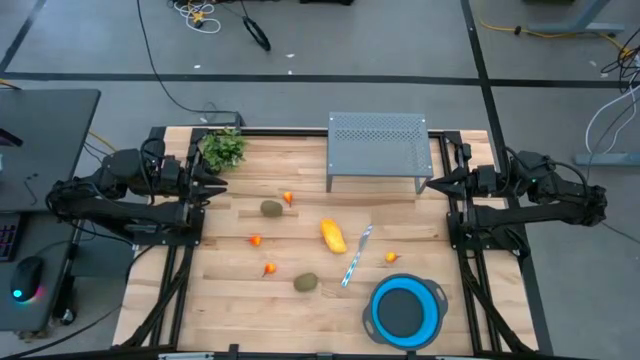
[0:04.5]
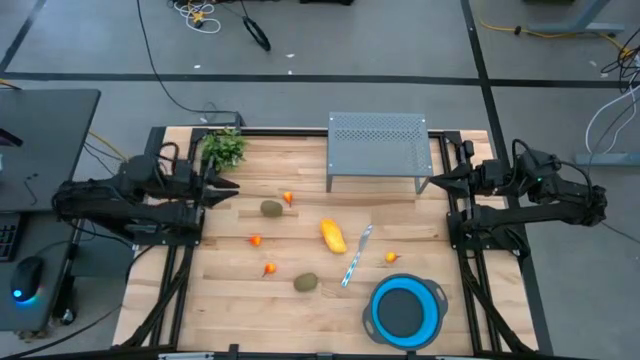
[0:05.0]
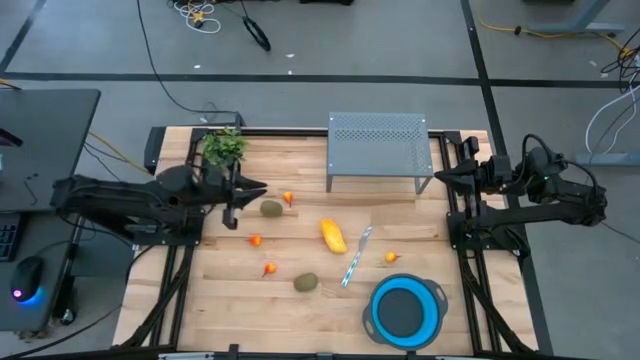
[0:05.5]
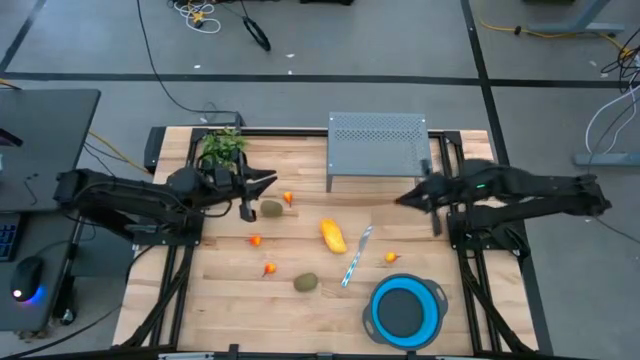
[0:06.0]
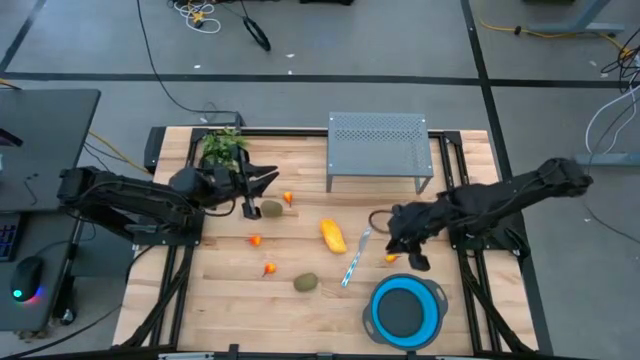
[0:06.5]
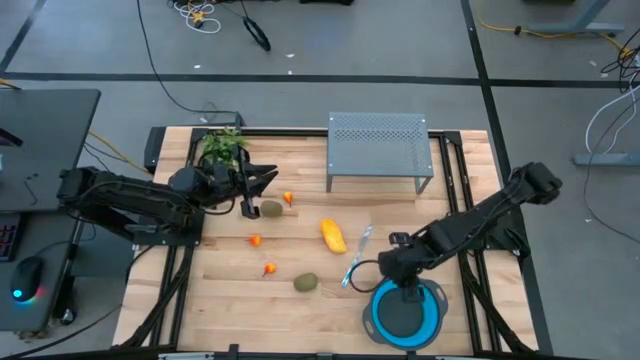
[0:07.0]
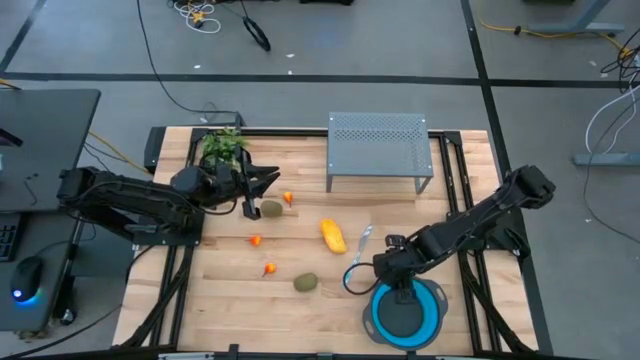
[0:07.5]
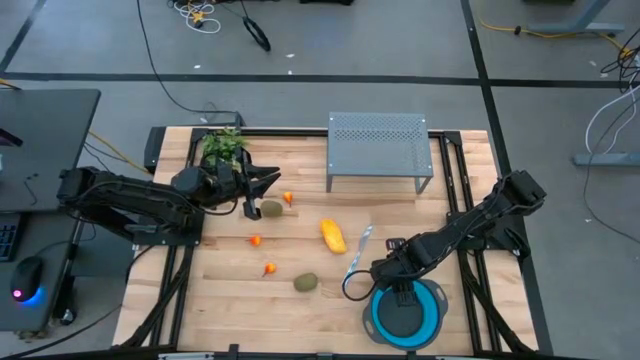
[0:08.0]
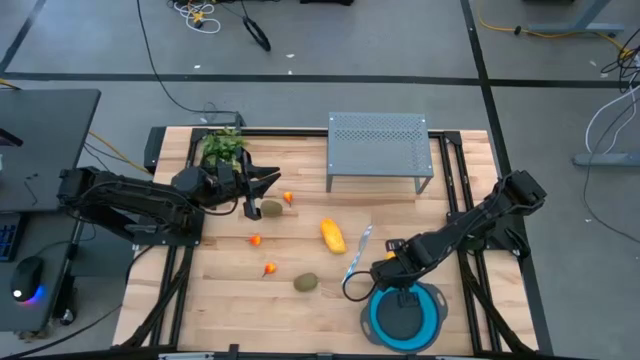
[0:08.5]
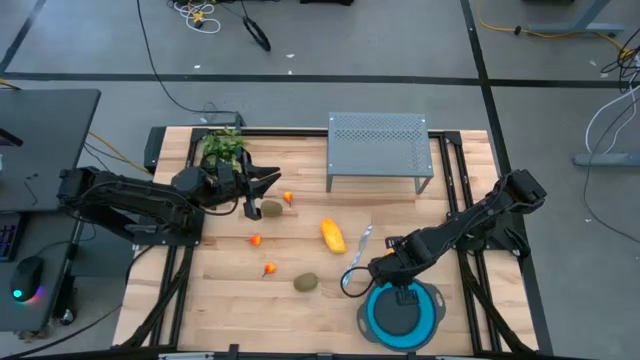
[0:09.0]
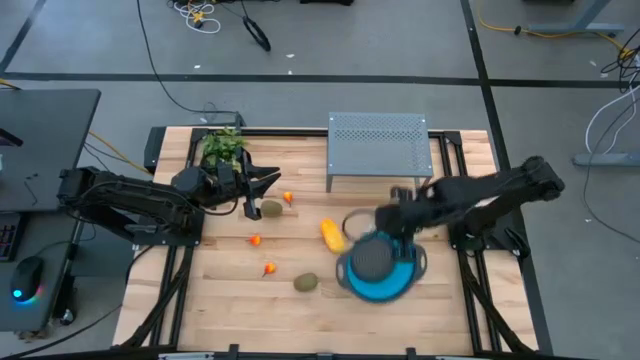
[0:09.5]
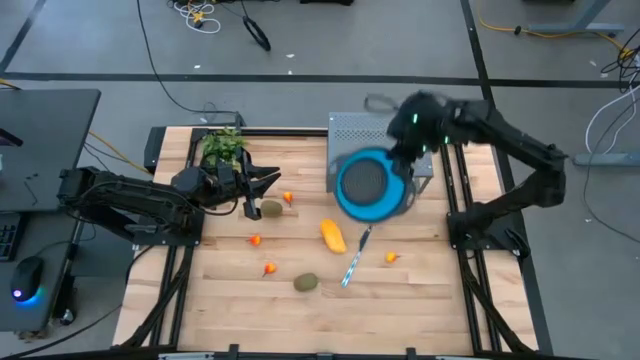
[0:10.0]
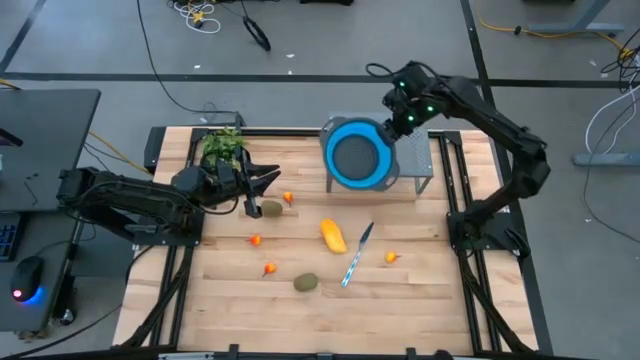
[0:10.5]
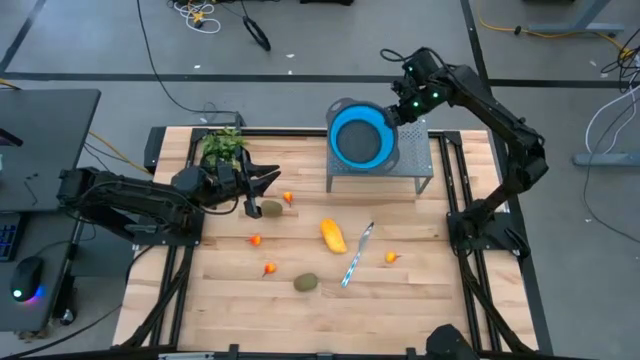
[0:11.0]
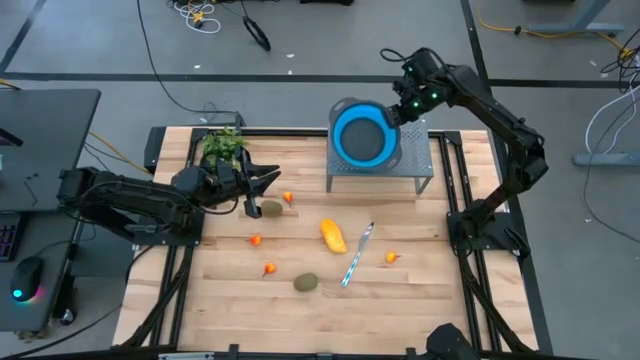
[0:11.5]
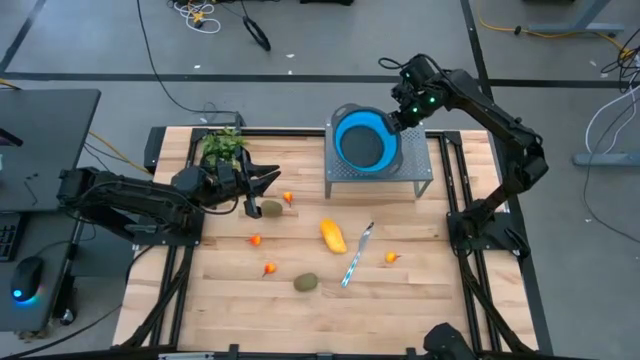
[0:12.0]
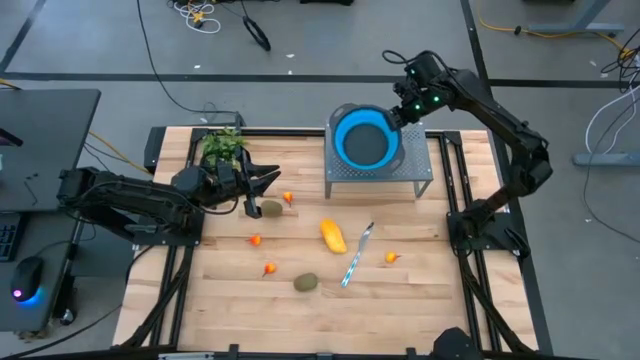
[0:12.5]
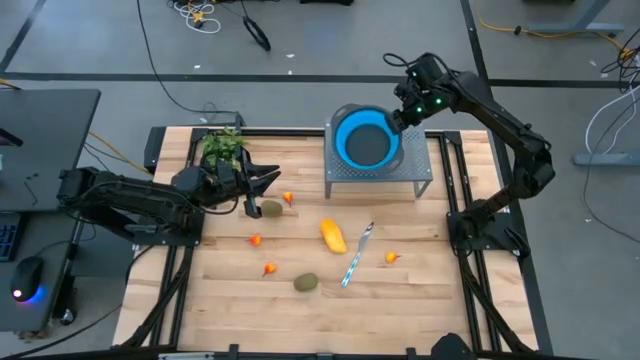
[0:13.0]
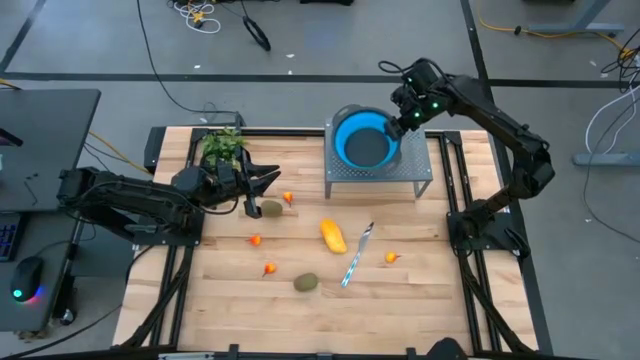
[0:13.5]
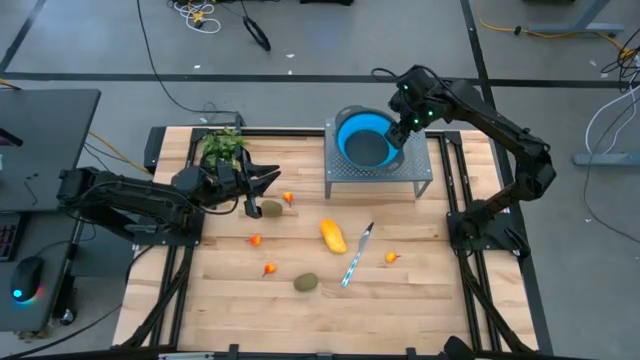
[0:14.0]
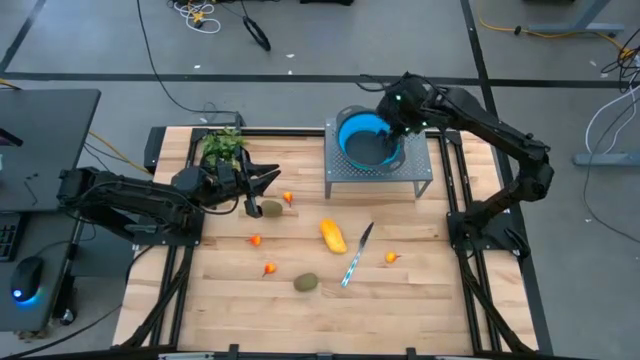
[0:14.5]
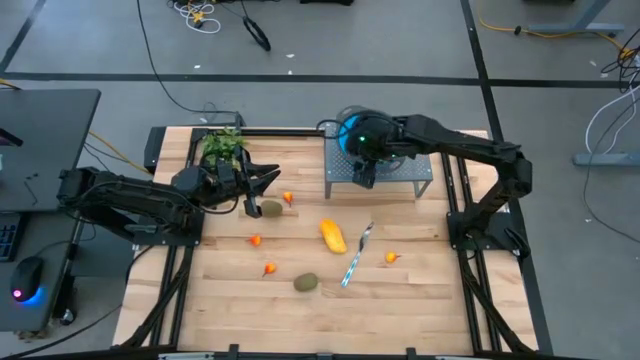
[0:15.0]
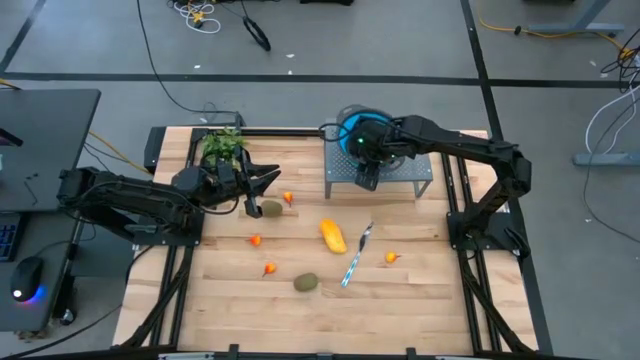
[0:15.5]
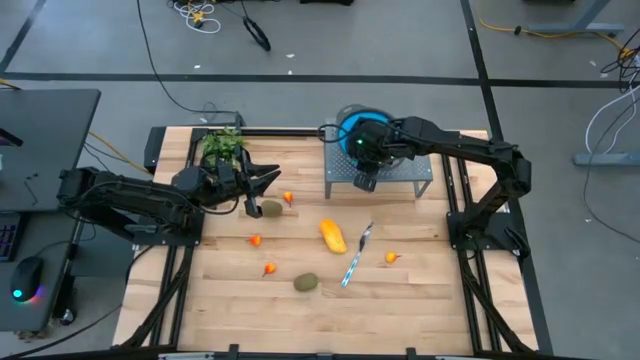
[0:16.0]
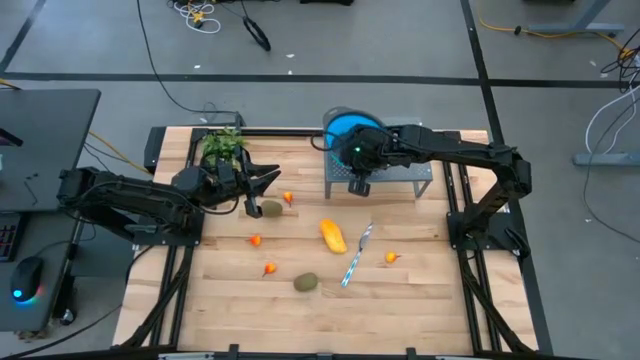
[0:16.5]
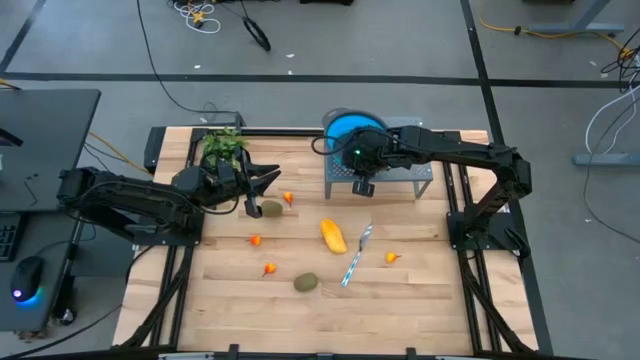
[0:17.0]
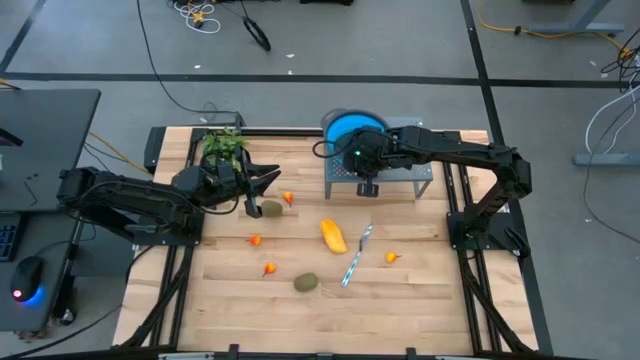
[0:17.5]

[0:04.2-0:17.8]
Task: Pick & Place Fruit
Put the blue strainer bowl on the shelf

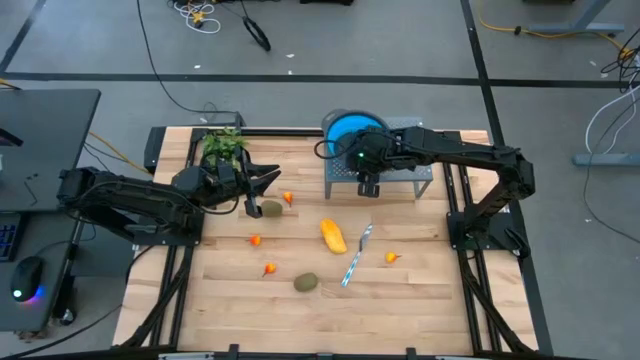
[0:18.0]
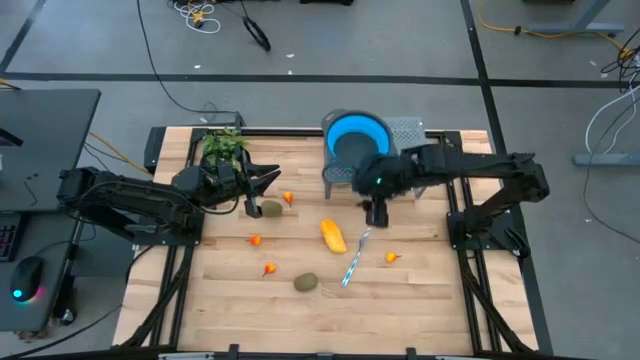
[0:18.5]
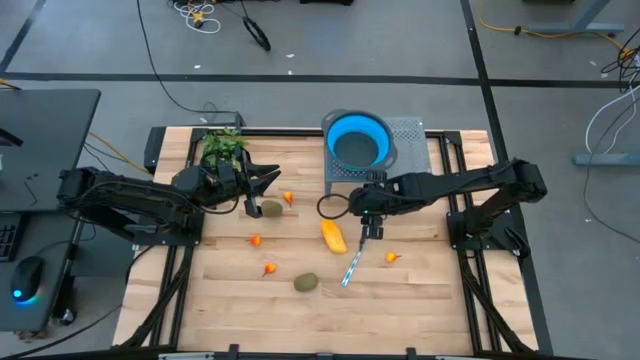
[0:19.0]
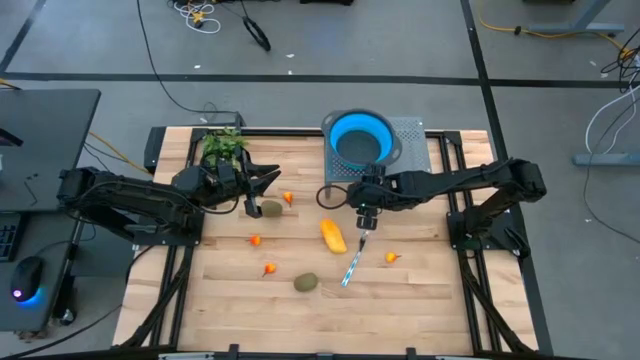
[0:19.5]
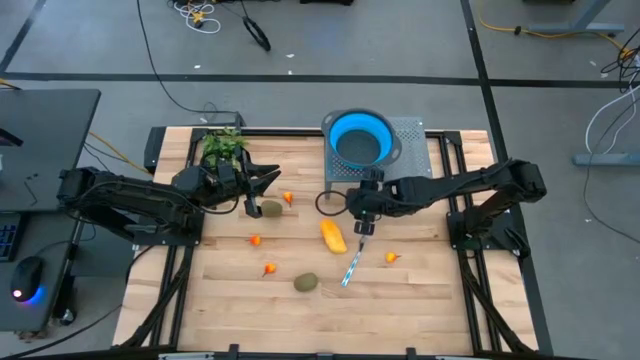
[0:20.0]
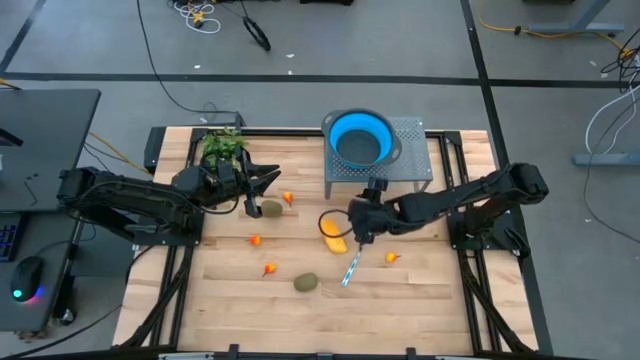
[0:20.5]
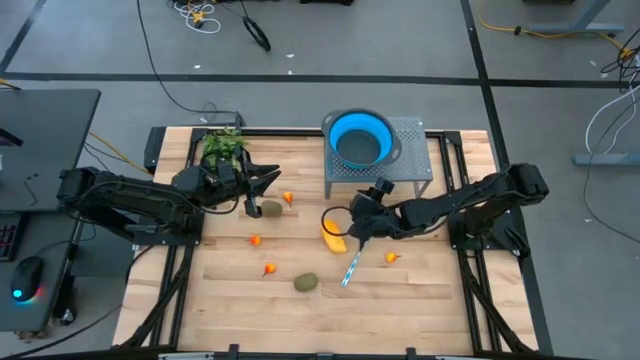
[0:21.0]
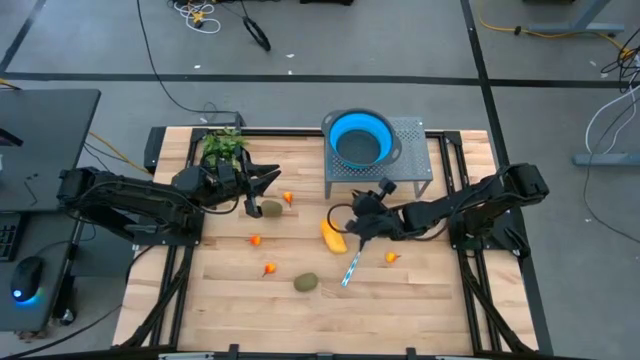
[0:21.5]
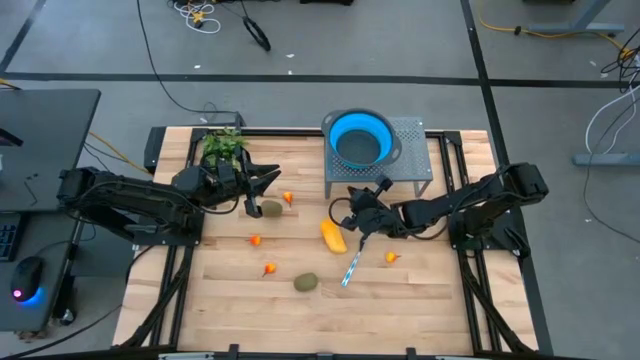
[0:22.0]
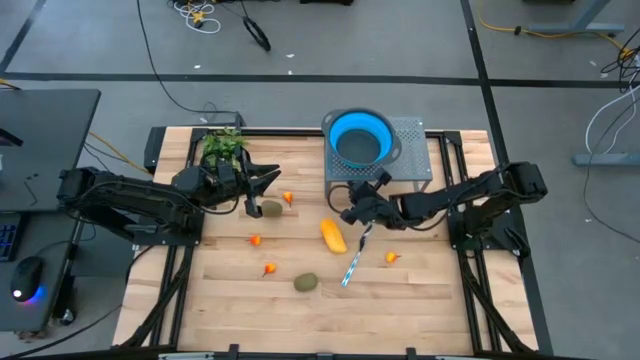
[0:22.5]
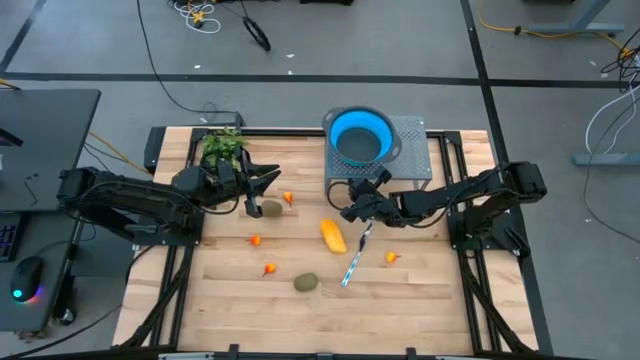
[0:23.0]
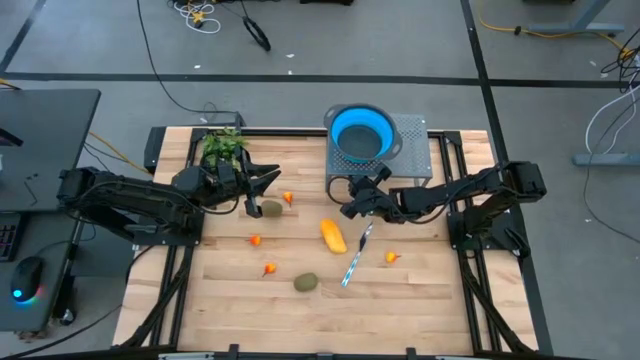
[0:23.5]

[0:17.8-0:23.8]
Adjust the shelf

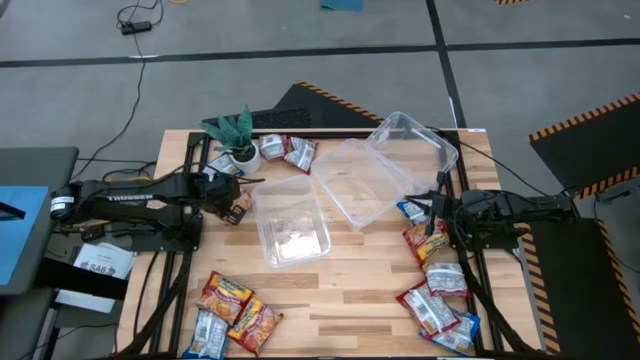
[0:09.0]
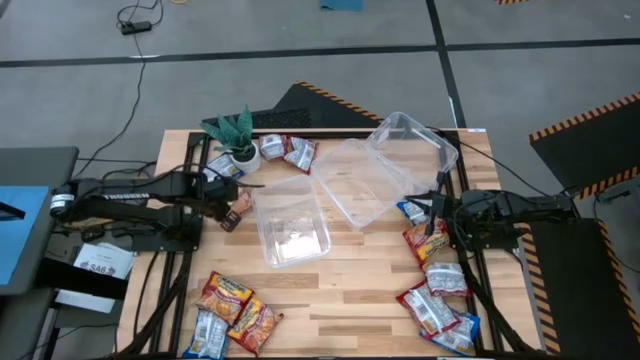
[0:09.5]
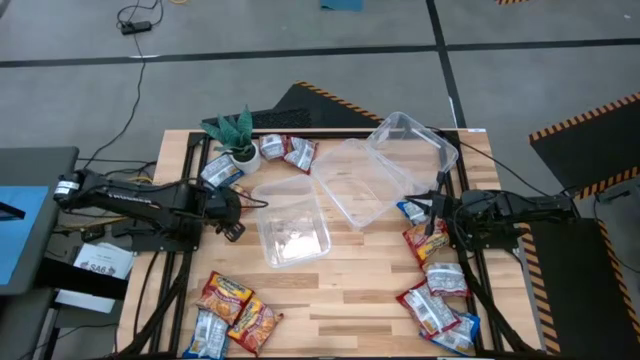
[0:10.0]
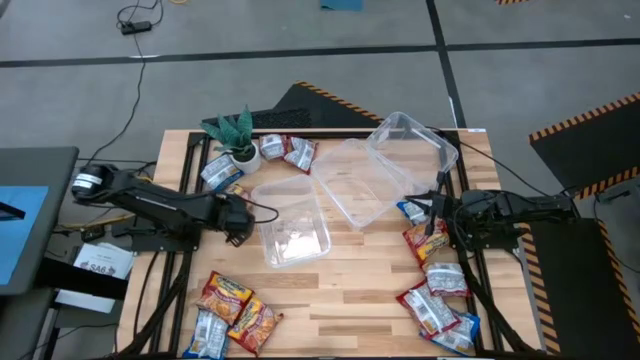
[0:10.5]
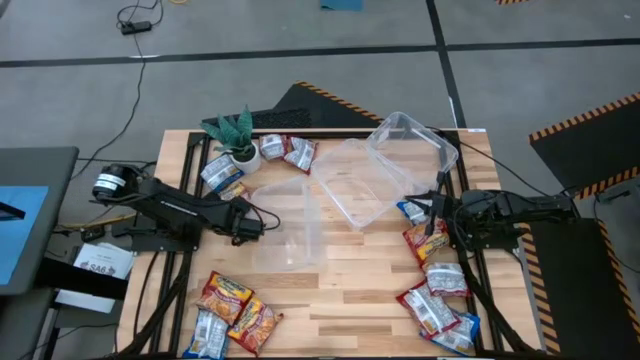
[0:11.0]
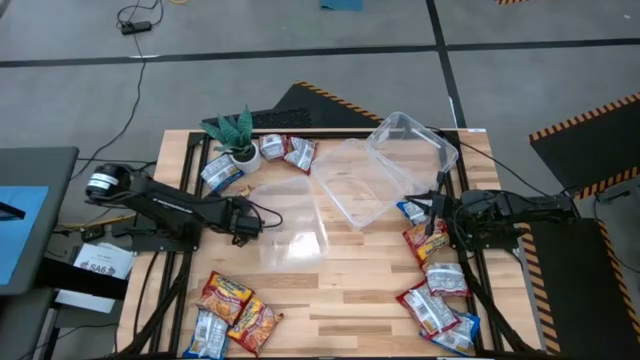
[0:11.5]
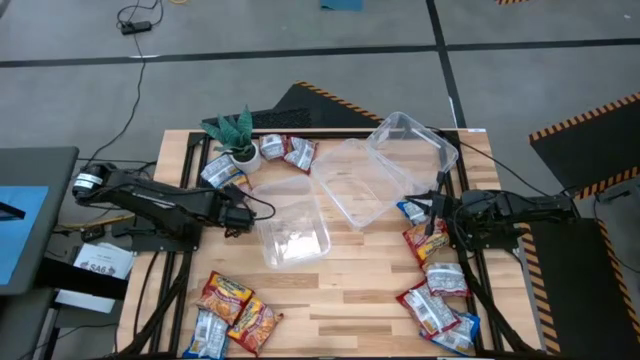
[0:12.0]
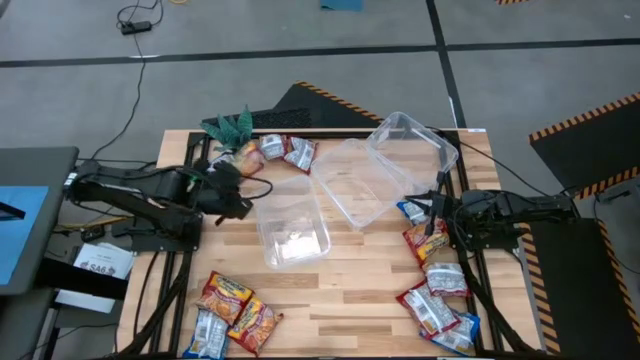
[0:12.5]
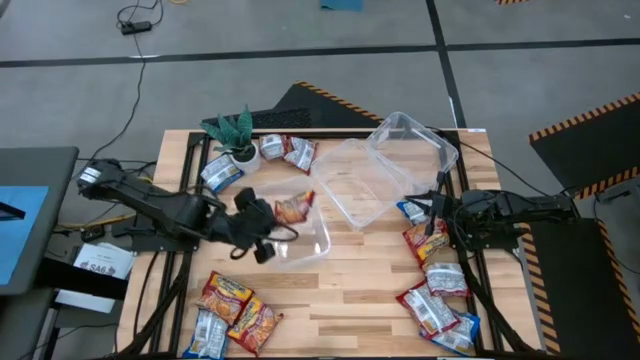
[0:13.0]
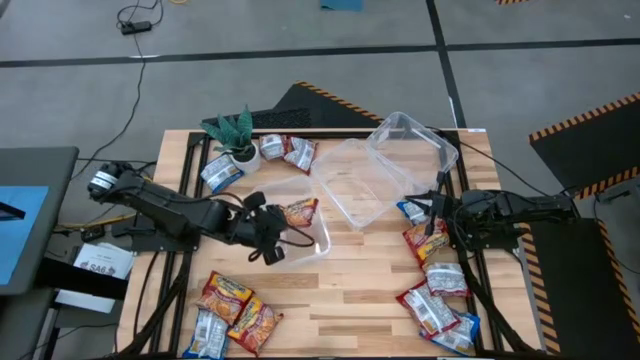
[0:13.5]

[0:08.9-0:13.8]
Task: Sort Maruchan noodles
Put the red noodle pack into the bottom bin
